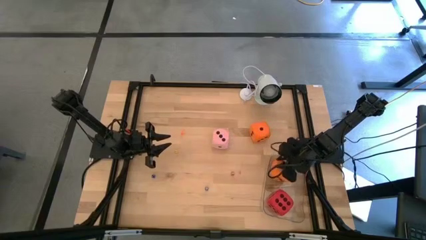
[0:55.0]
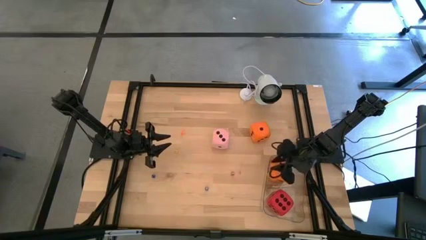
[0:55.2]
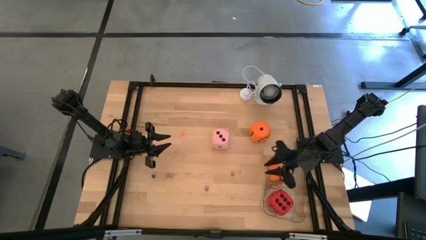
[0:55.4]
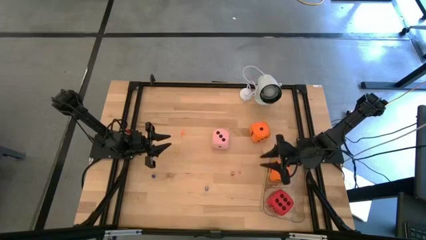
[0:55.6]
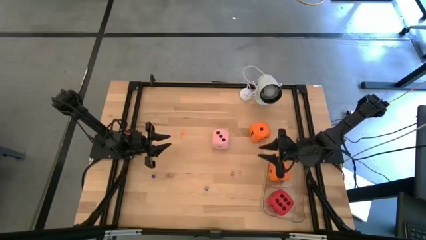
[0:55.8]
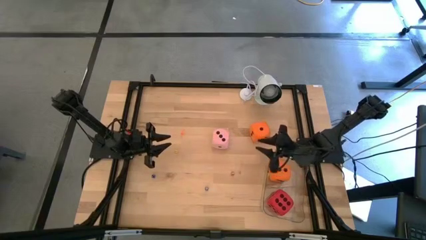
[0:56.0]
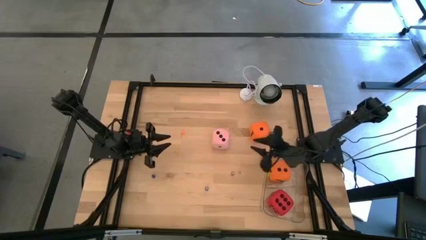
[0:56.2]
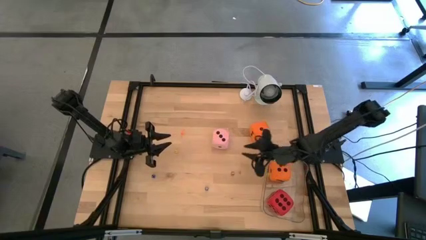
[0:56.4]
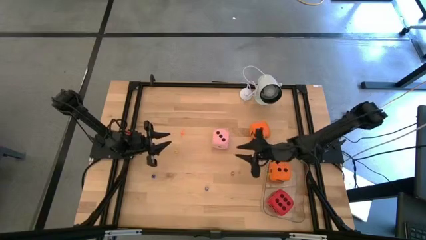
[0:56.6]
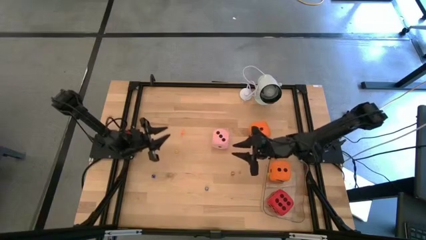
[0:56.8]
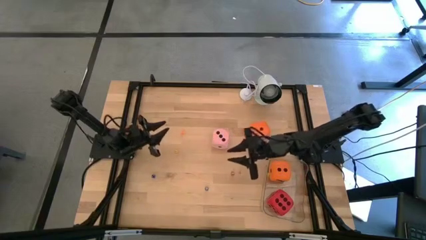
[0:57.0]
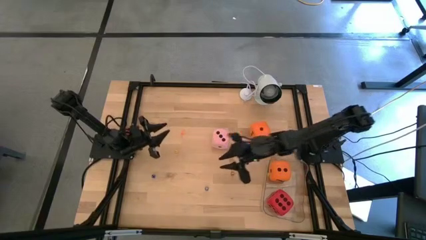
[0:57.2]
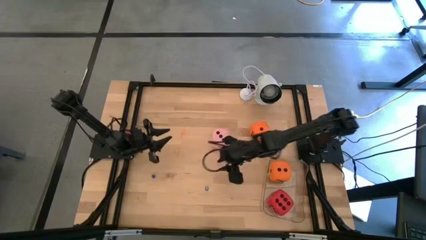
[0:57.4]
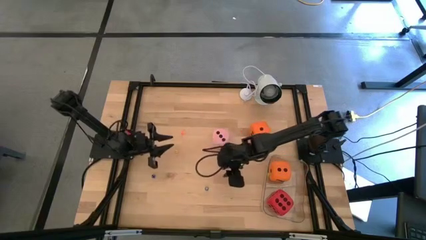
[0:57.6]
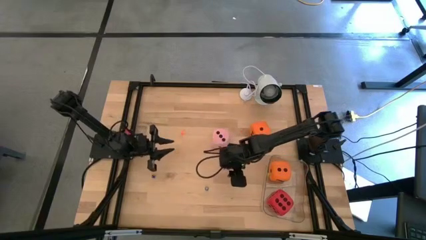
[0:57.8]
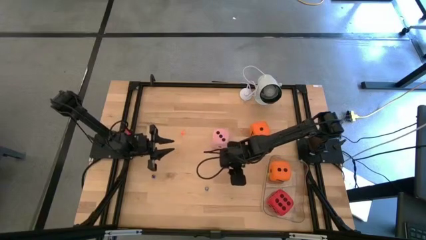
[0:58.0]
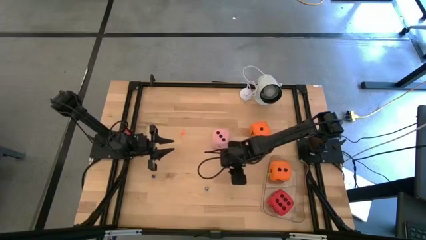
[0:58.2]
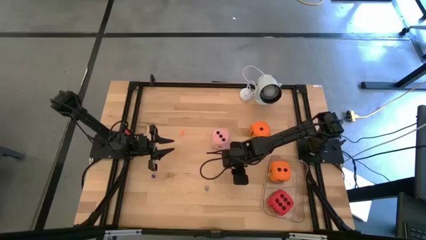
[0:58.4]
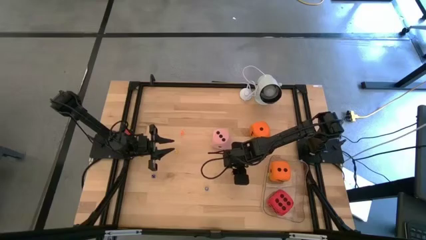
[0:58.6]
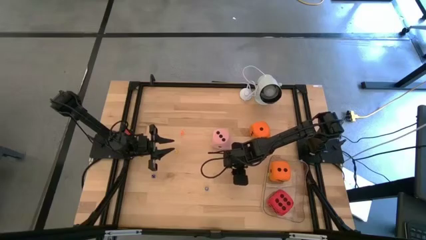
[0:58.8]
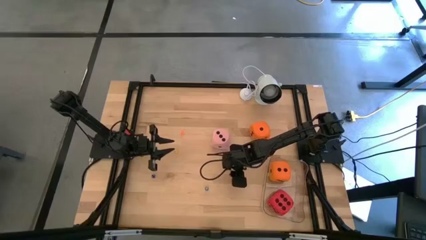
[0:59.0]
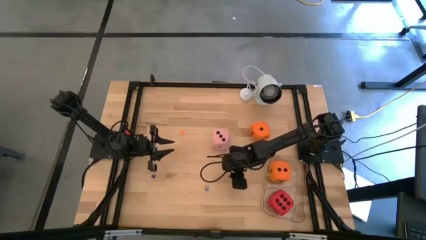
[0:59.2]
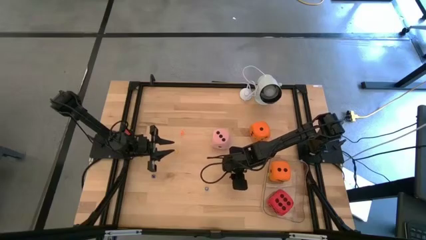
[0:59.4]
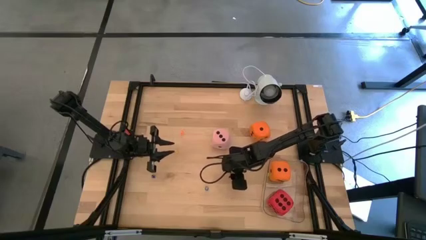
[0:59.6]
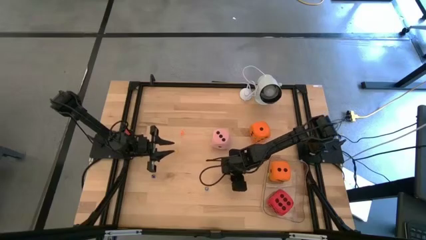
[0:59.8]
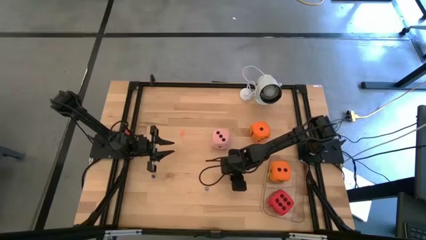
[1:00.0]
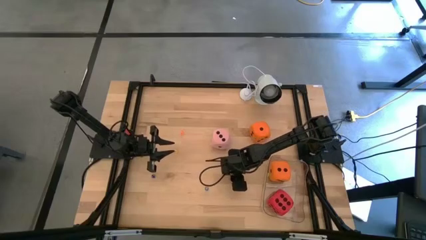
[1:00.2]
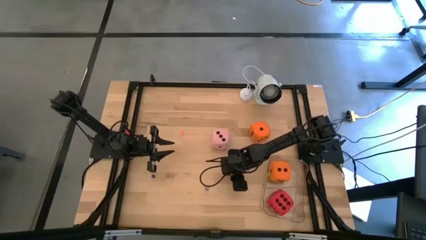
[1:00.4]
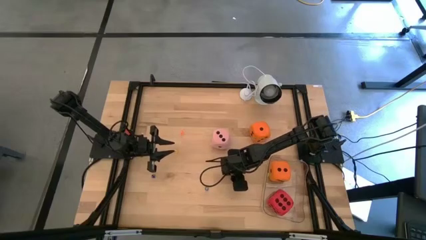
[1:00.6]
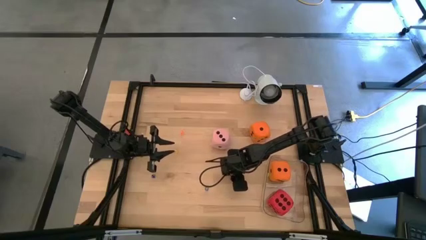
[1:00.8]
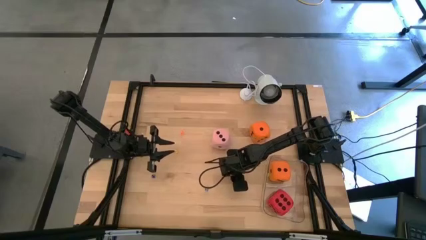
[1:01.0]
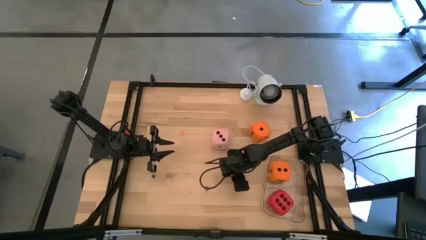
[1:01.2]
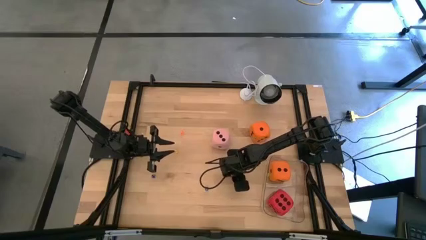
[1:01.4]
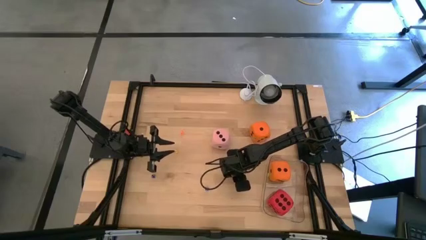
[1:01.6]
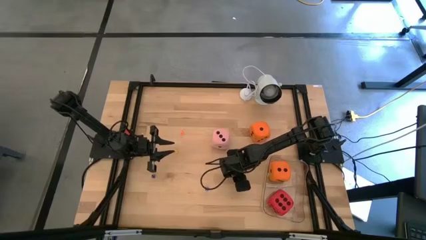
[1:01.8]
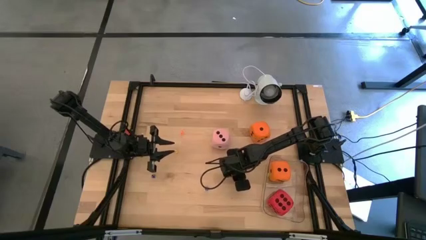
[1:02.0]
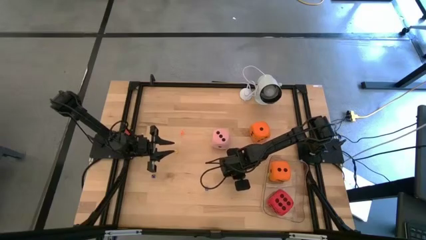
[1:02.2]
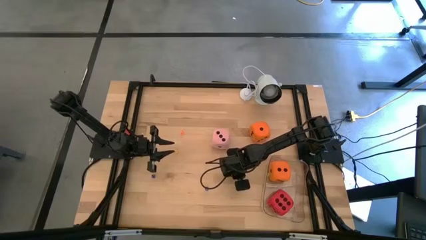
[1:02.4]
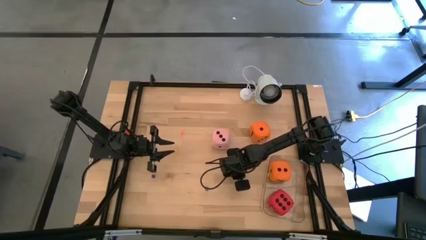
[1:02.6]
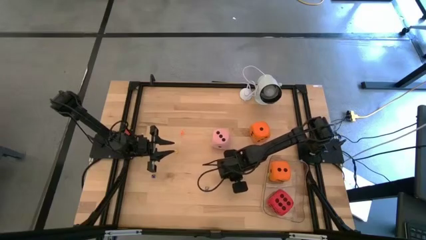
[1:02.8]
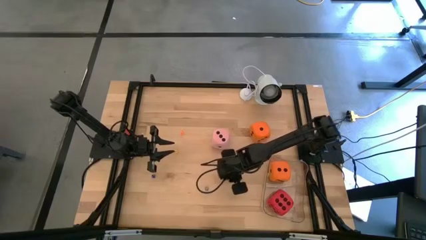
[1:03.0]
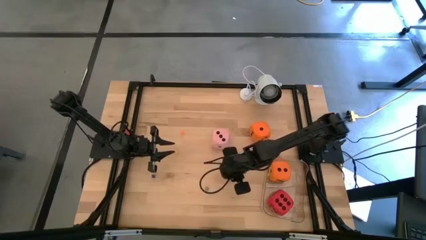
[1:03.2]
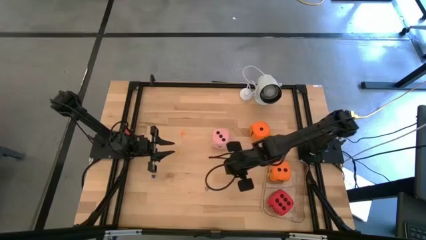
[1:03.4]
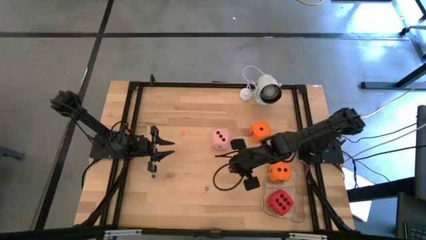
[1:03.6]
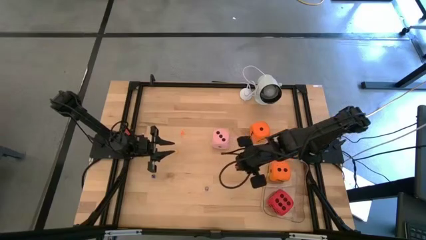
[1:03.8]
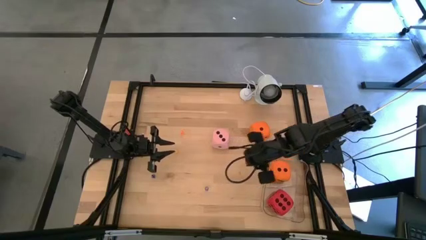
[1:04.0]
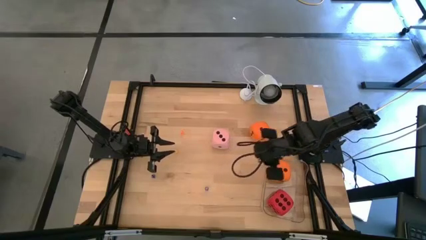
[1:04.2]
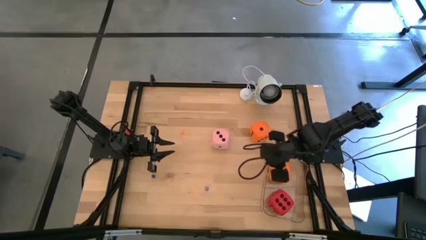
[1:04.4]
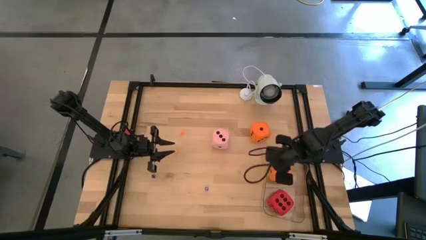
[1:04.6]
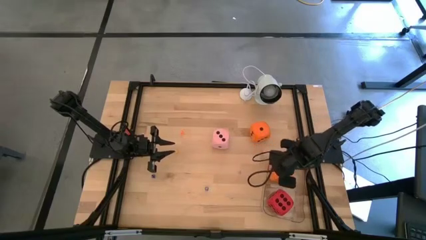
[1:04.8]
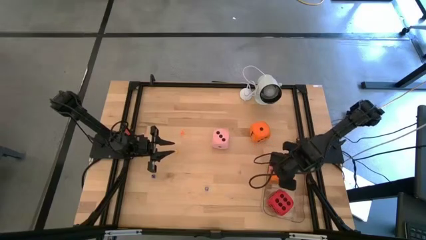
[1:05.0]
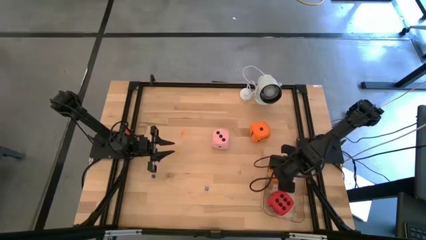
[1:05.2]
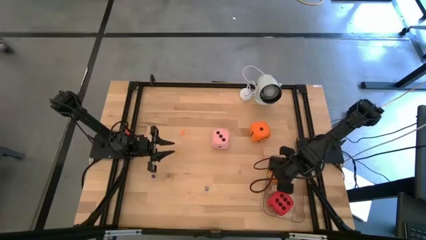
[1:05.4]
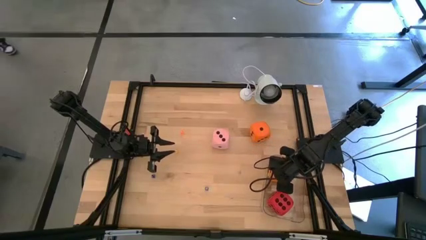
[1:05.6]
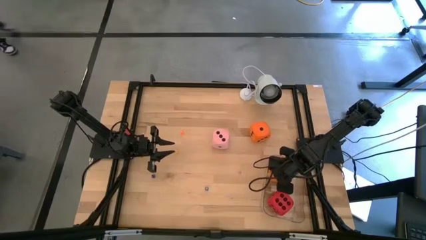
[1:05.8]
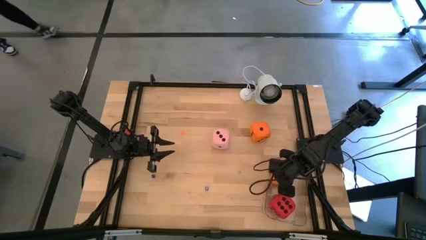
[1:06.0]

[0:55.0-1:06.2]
Task: Pick & Place Dice
Put the small red die into the transparent container
